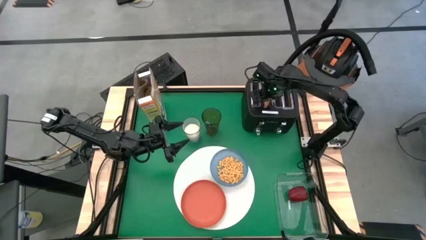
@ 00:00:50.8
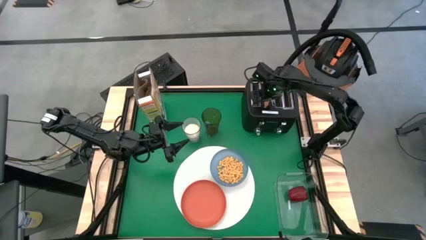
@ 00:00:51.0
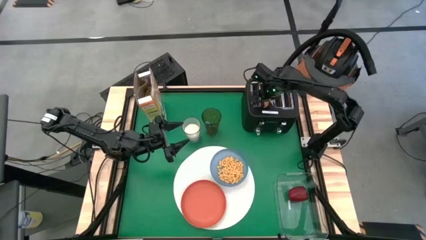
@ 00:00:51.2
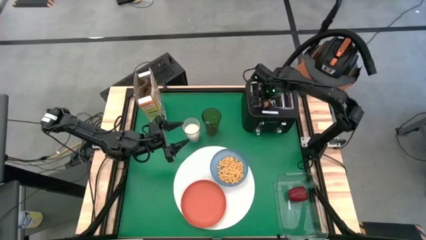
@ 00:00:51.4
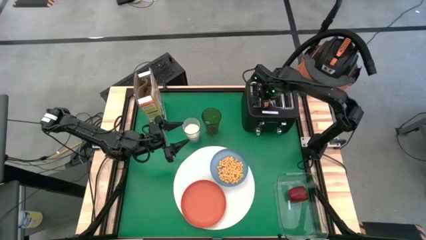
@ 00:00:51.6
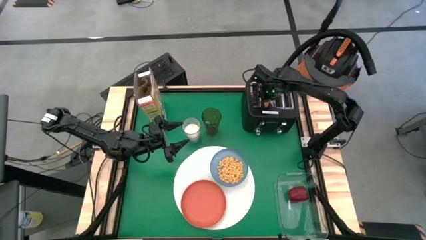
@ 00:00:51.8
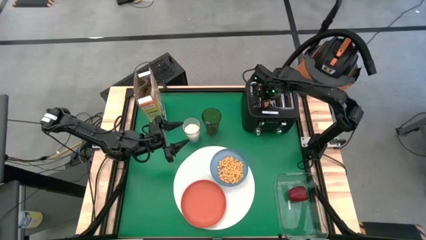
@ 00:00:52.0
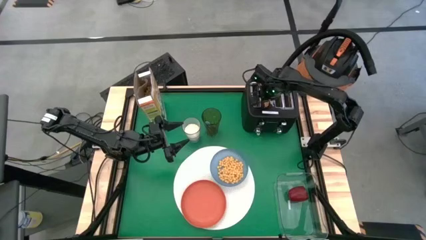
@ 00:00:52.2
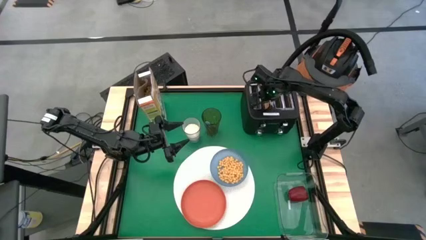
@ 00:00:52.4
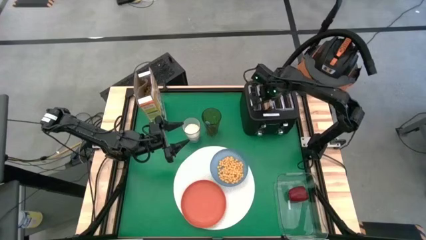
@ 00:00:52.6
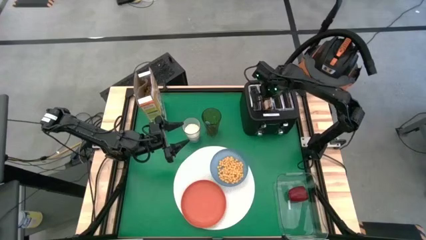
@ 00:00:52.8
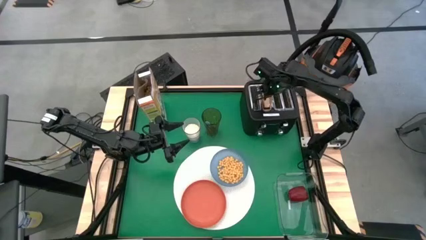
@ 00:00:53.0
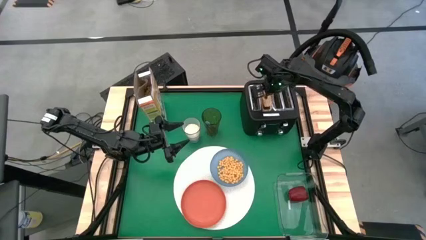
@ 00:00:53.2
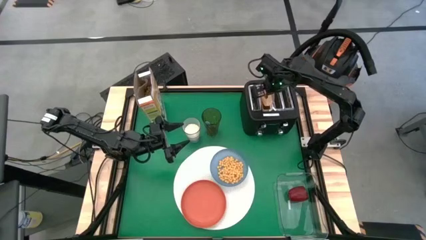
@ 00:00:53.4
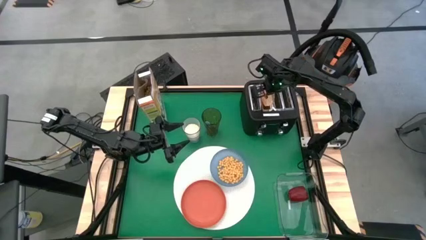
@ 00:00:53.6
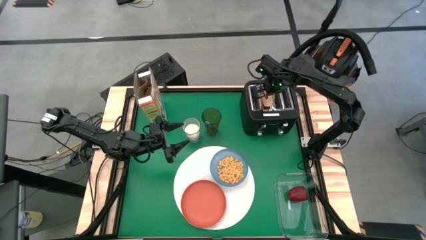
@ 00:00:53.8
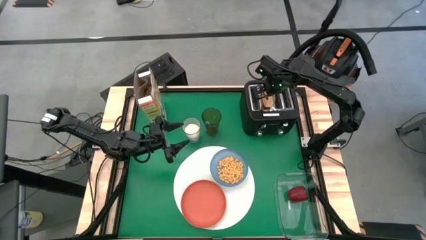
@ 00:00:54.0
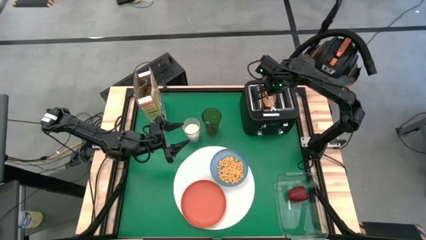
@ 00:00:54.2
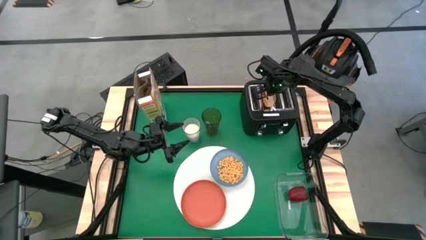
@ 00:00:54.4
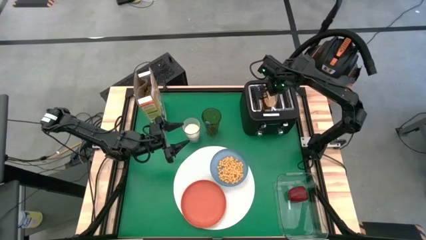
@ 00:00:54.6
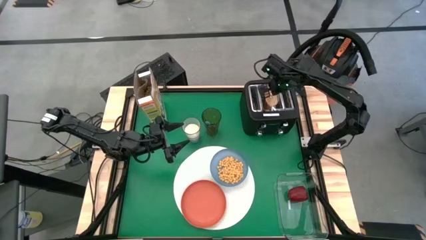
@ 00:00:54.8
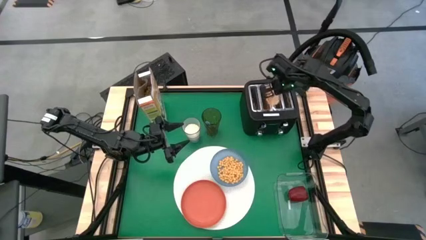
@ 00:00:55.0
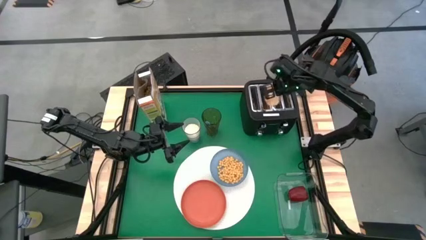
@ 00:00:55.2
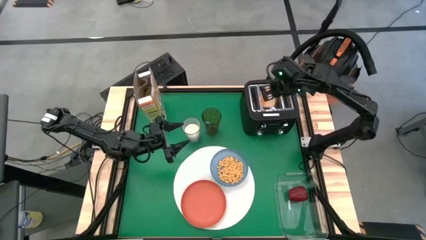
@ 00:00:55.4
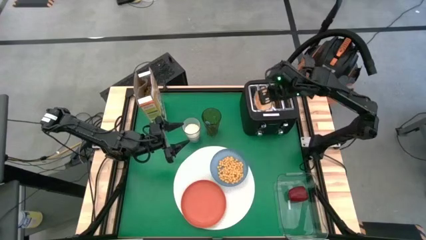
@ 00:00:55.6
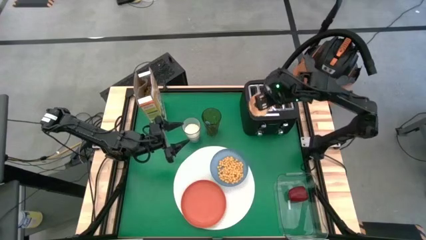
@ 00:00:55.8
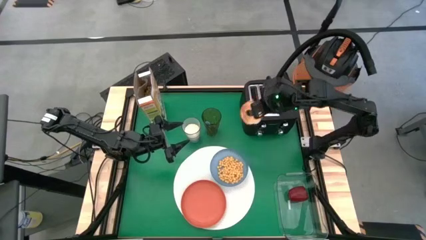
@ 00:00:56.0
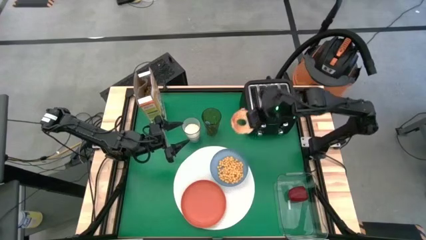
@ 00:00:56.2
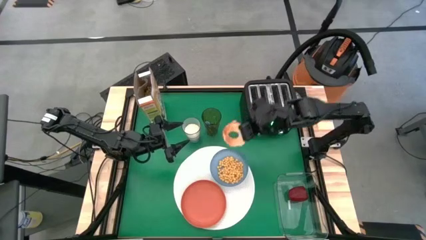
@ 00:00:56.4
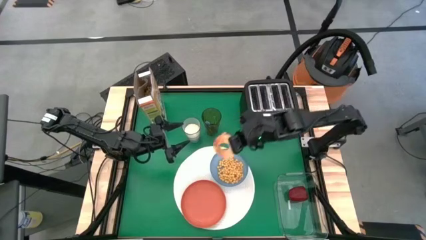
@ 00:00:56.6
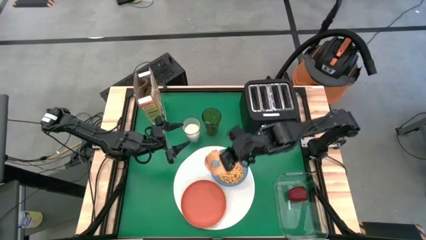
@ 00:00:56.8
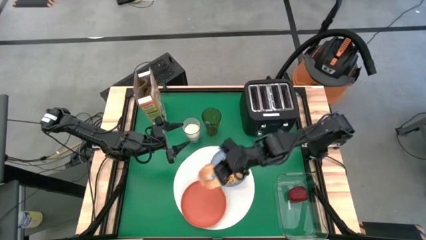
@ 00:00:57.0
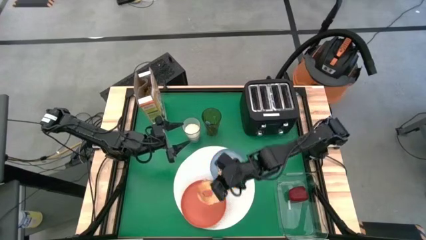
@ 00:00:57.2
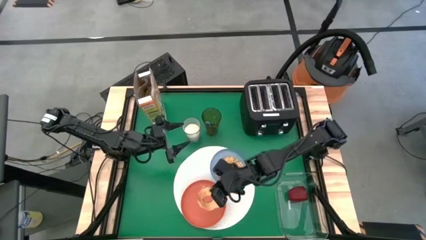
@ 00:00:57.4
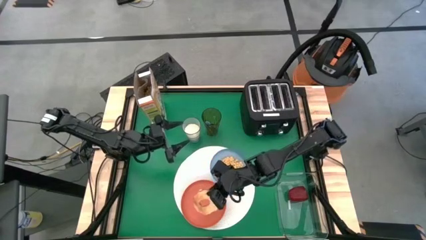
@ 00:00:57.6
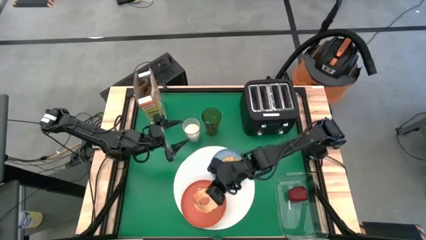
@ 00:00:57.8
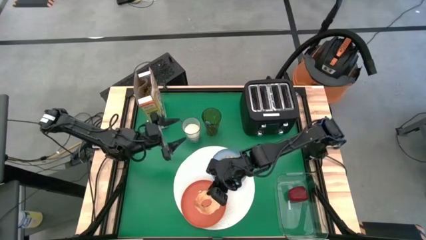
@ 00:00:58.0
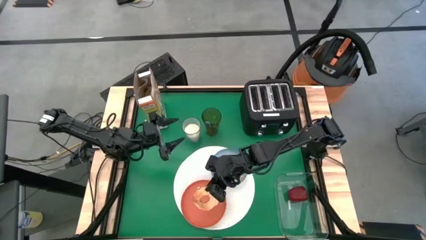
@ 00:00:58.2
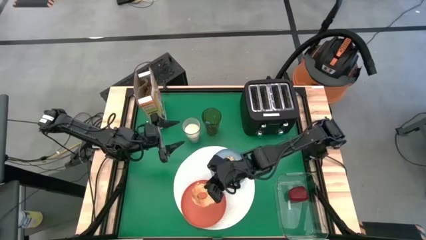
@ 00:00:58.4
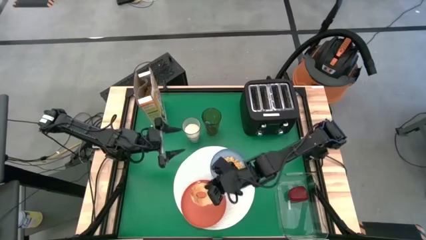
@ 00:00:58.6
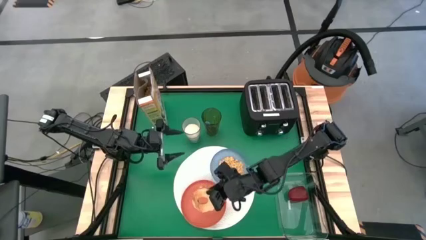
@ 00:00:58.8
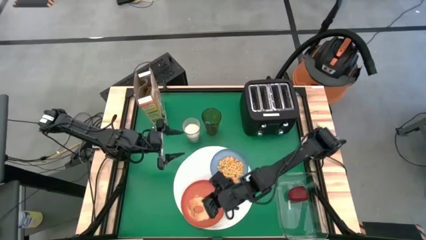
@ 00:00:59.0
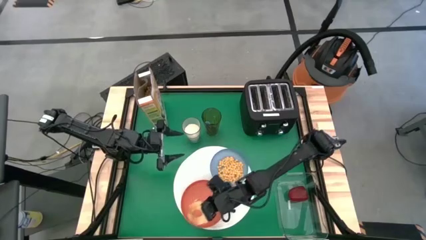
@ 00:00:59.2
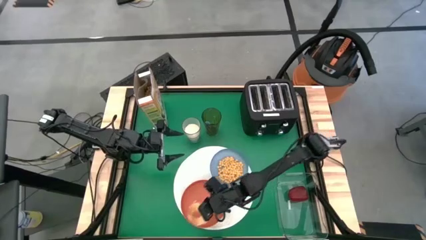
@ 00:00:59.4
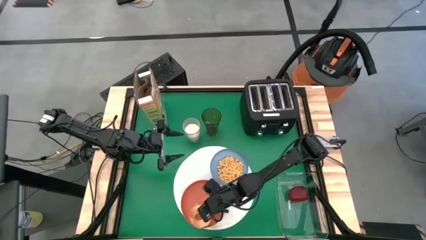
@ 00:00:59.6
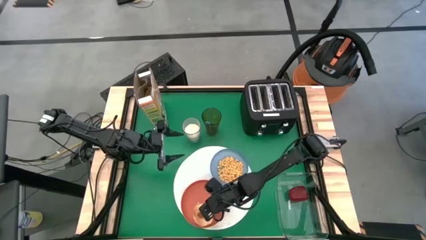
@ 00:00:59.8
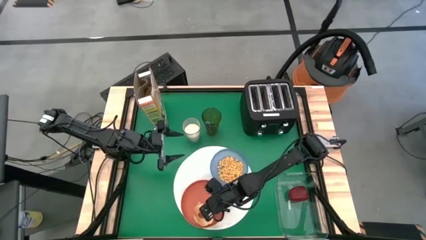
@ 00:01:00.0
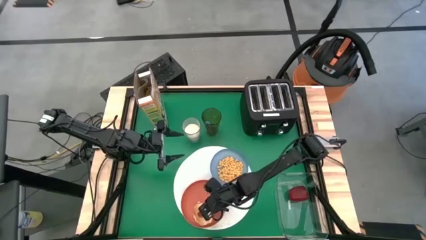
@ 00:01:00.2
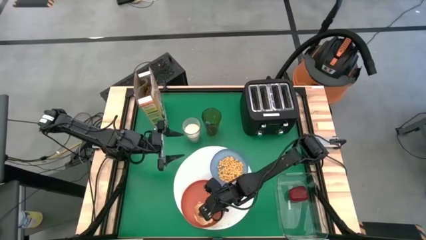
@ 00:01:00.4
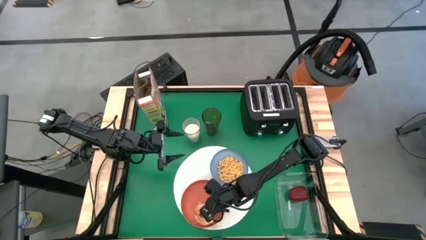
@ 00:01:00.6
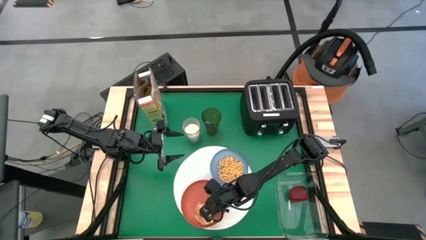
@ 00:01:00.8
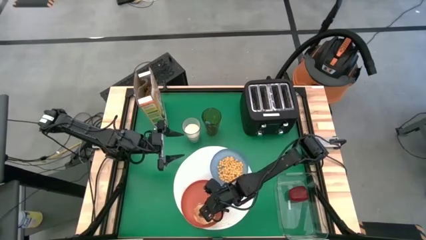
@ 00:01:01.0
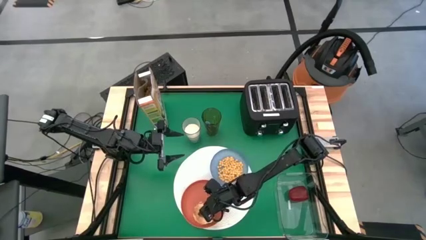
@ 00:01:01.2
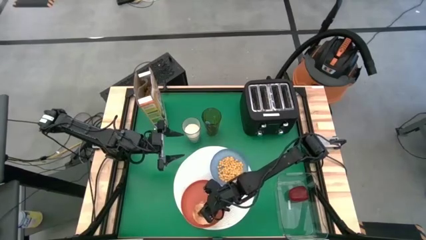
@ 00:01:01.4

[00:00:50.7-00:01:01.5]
Task: Arrange a breakfast setting
Put the bagel from the toaster on the orange plate
